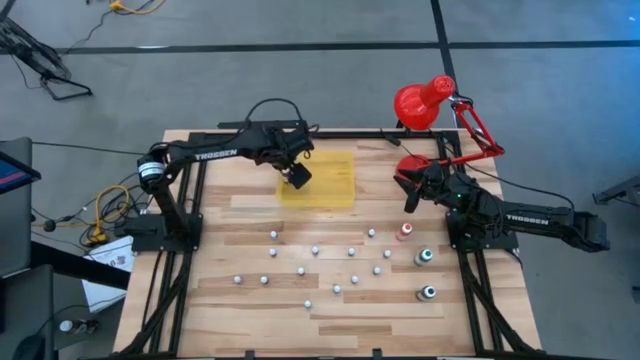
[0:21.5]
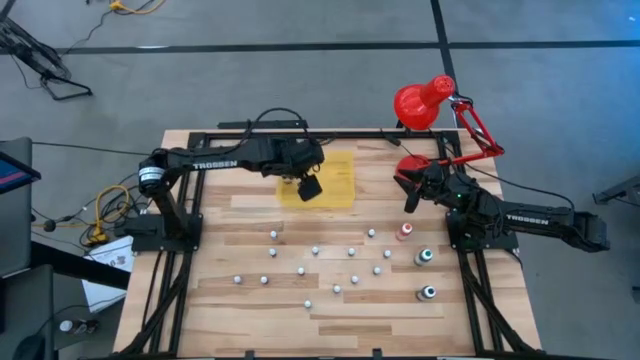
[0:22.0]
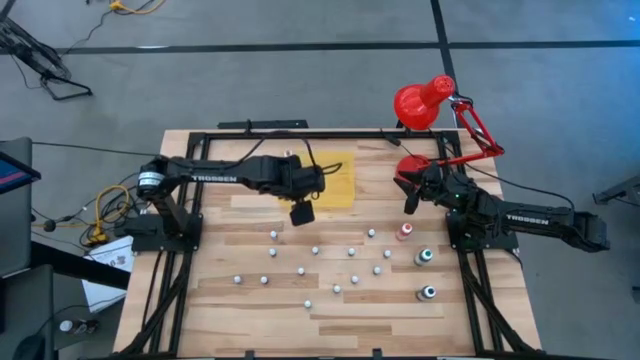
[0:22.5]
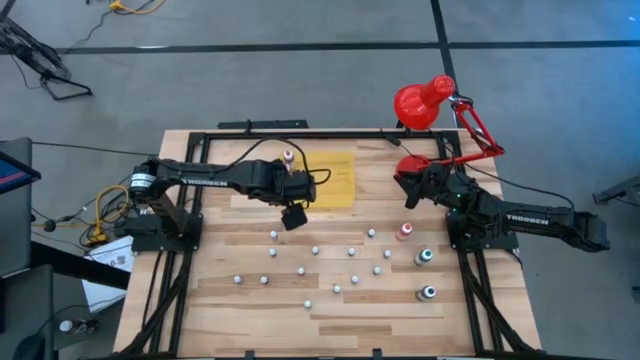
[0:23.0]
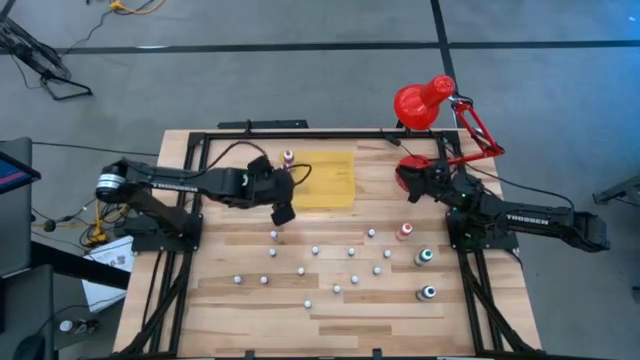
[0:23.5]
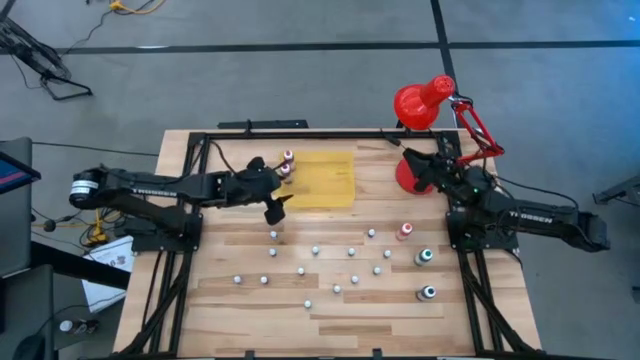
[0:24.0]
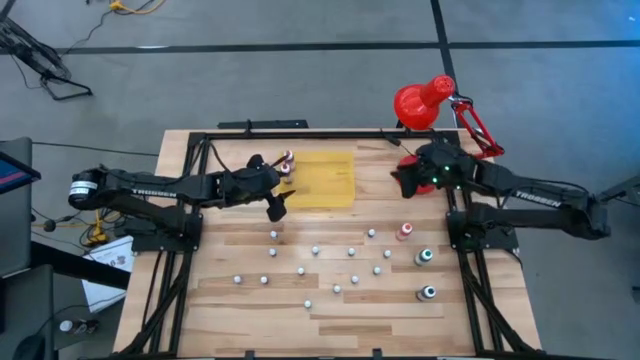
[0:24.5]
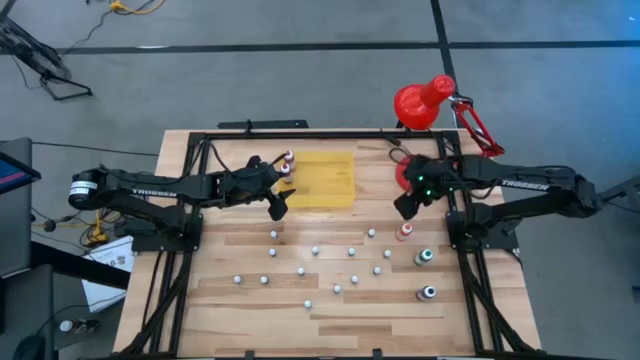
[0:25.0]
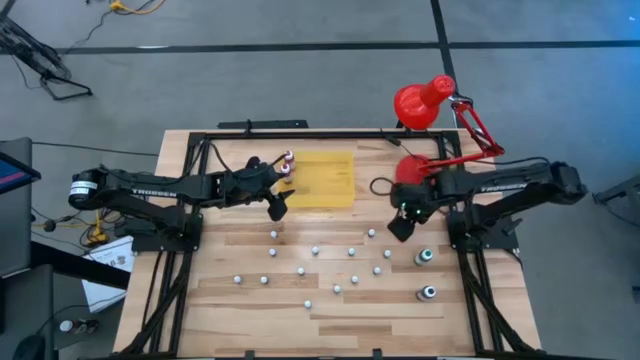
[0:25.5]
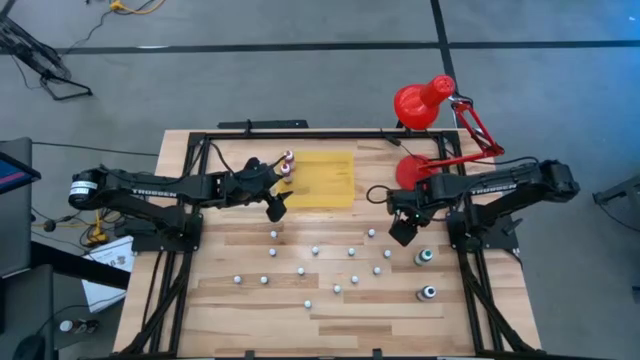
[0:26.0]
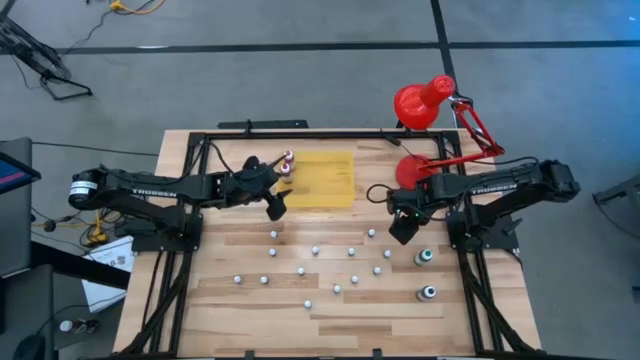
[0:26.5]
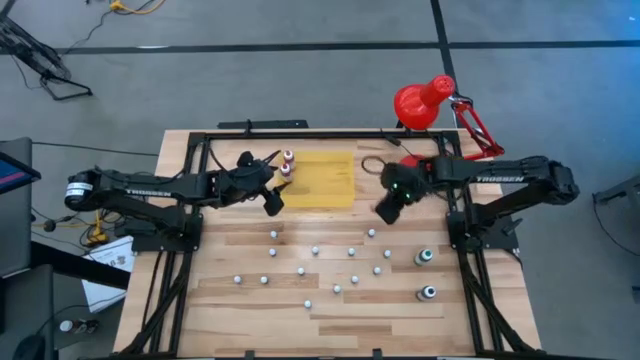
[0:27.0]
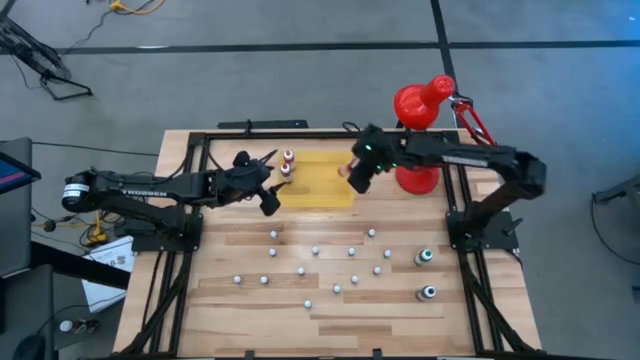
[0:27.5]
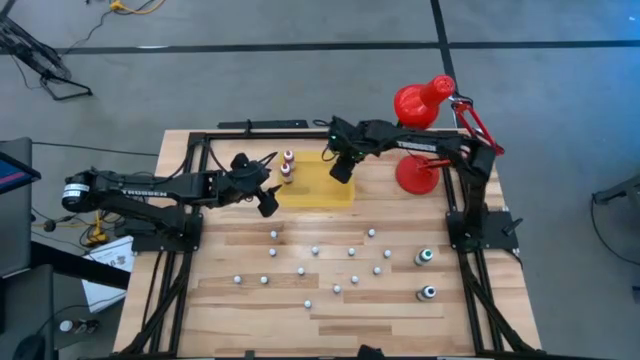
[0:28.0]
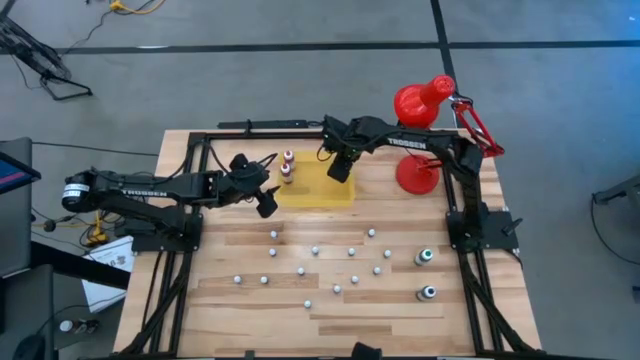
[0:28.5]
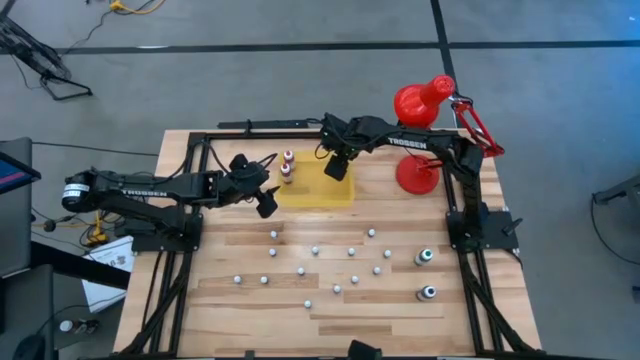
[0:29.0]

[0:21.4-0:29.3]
Task: Pick & Place food coloring
Put the large orange food coloring in the bin

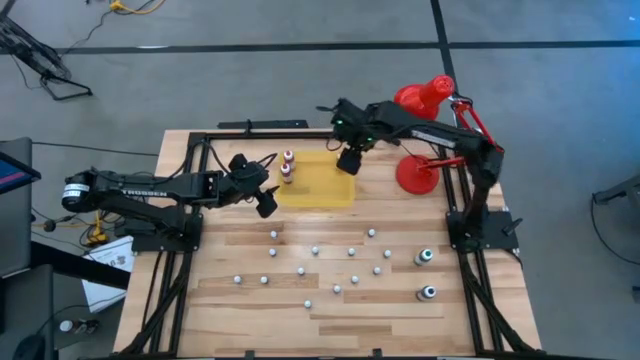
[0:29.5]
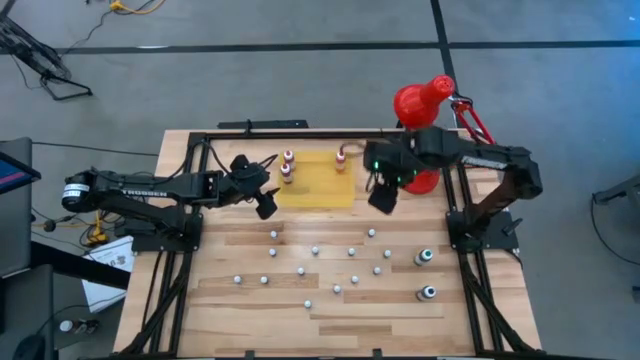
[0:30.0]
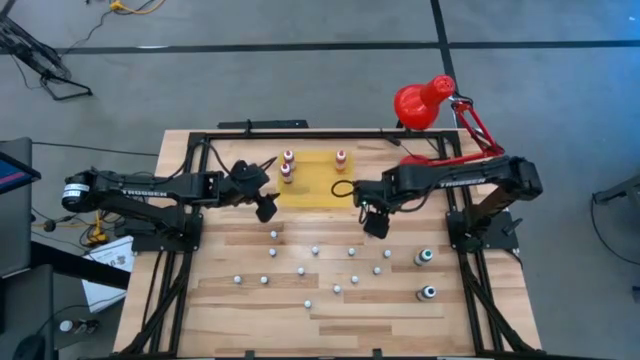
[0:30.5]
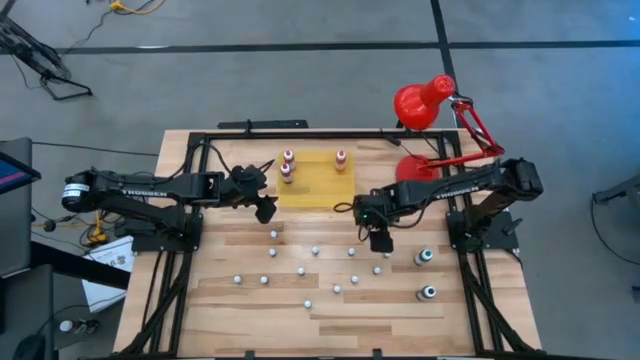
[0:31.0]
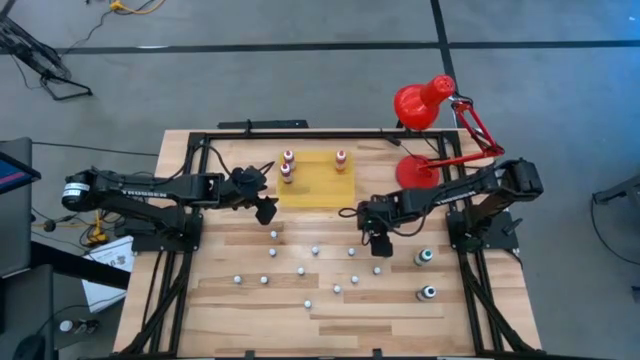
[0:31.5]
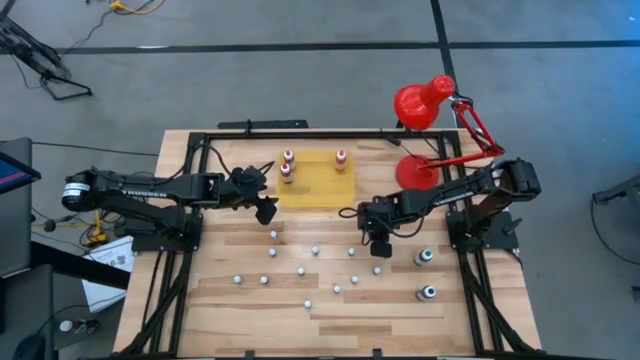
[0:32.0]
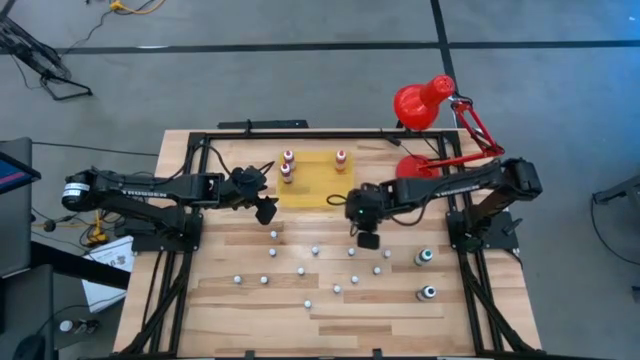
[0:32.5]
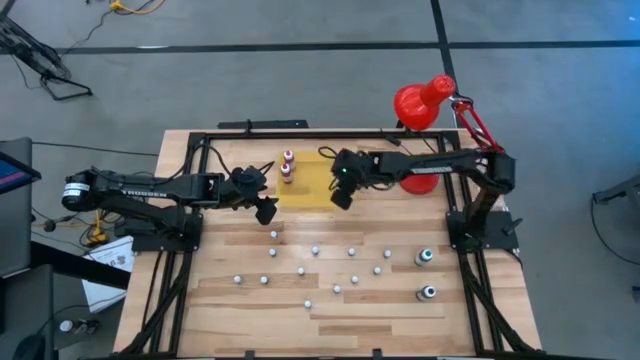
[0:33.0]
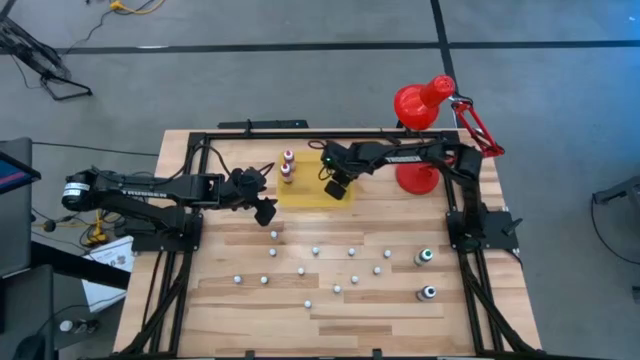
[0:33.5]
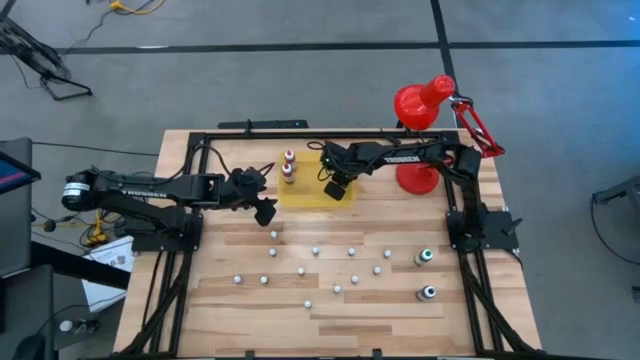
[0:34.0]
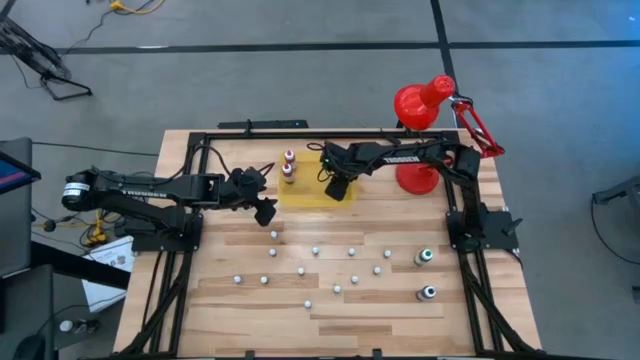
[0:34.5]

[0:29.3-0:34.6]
Put the small white food coloring in the bin

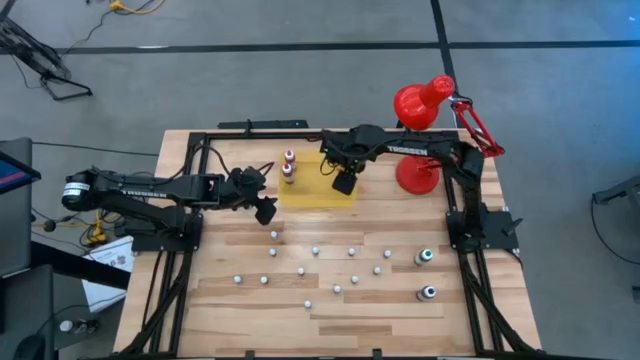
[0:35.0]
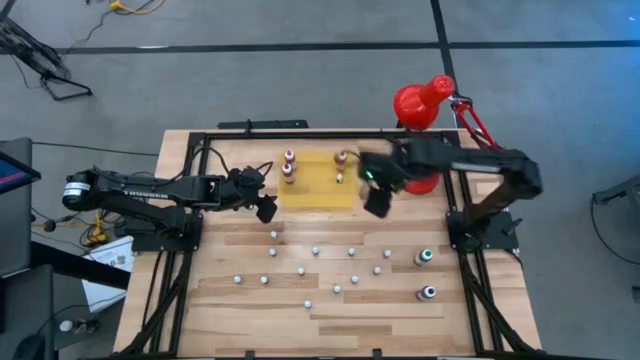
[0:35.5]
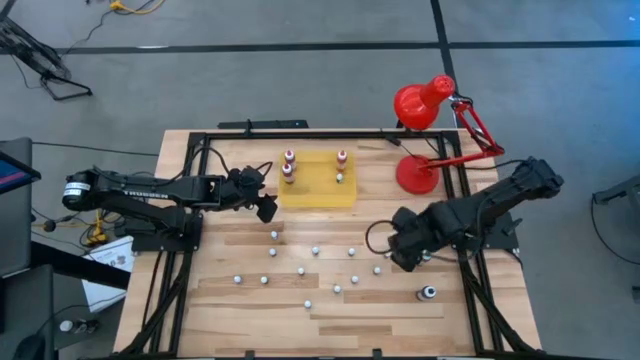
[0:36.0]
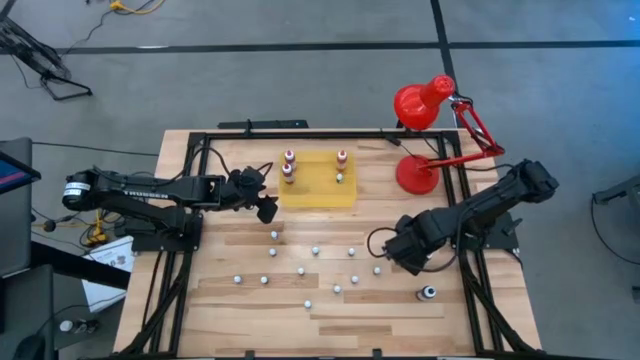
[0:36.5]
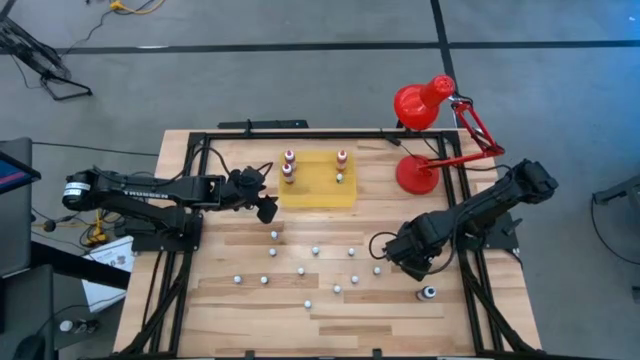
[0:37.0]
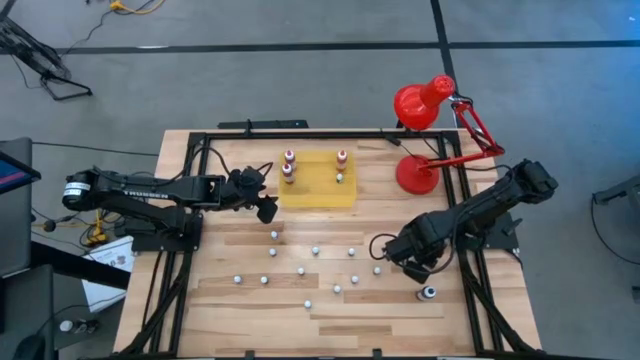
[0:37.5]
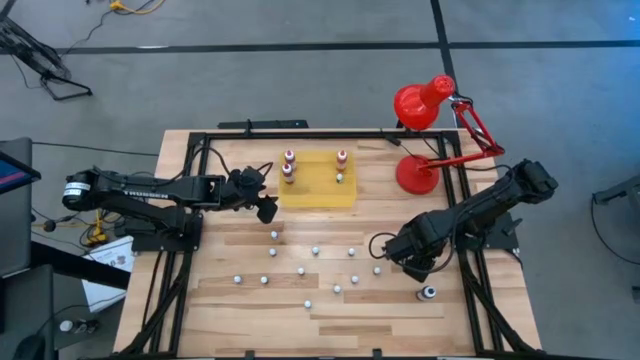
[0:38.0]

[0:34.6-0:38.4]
Put the large green food coloring in the bin

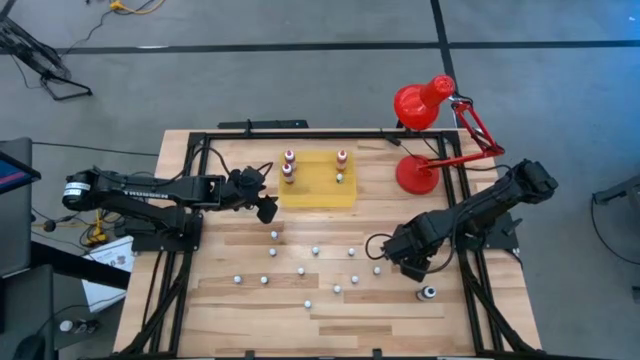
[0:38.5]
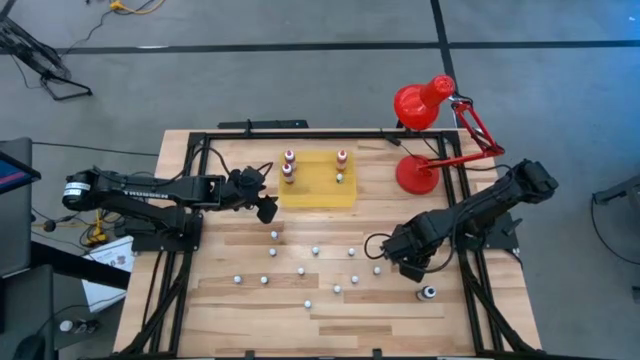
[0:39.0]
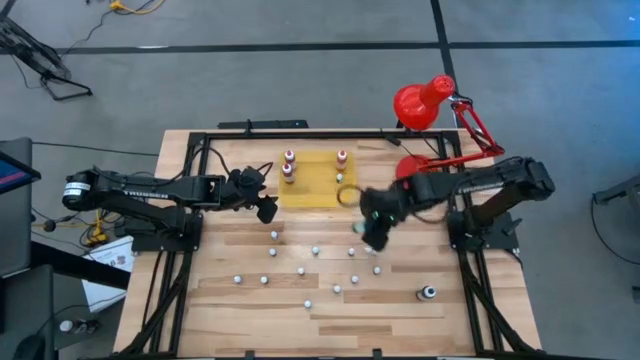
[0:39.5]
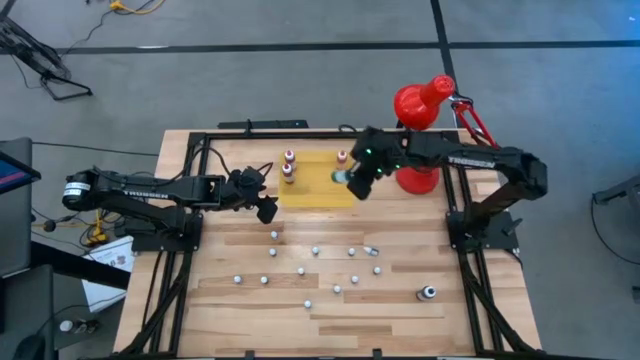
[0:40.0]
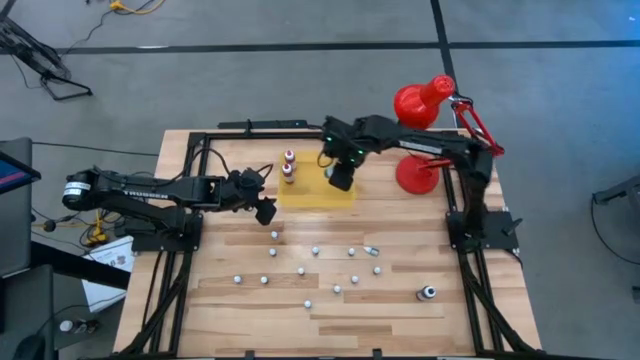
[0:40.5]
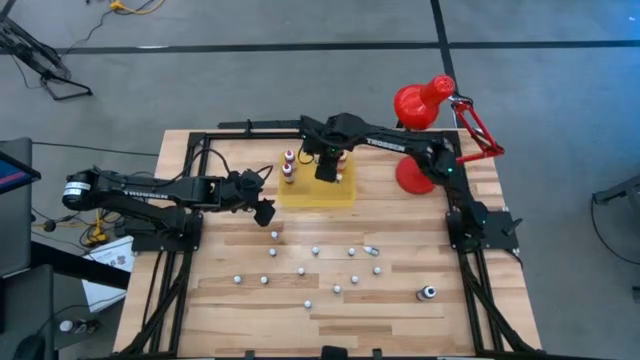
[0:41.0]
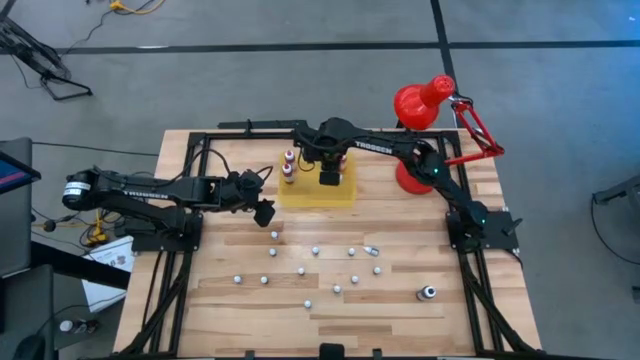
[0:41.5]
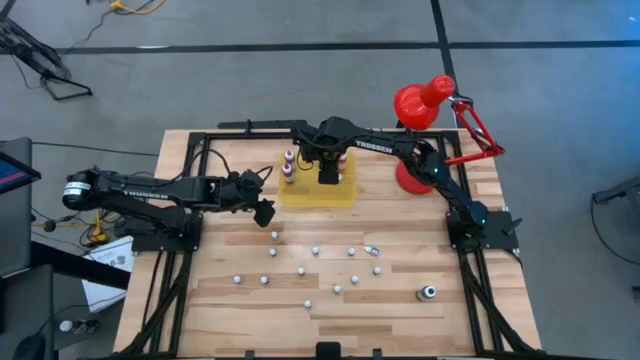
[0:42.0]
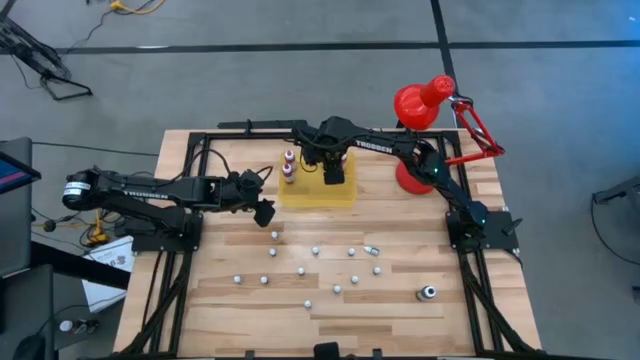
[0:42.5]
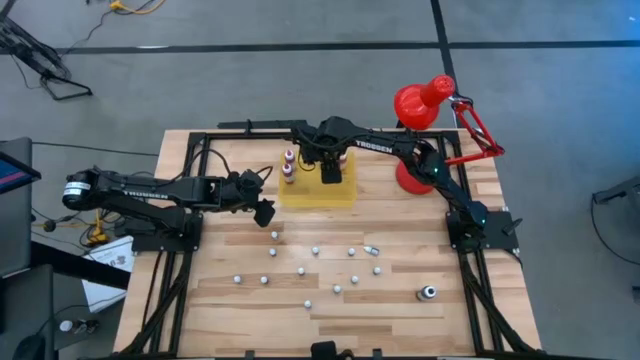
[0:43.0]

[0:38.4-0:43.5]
Put the large green food coloring in the bin
